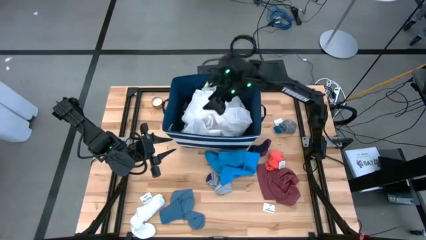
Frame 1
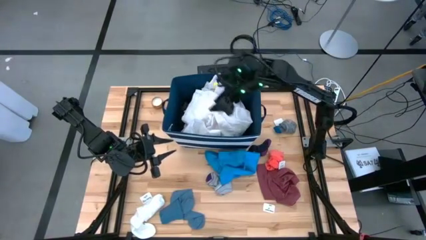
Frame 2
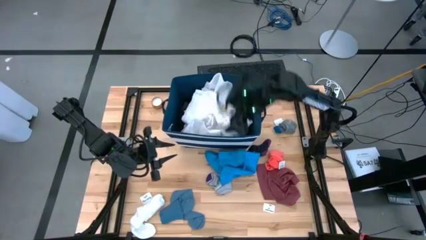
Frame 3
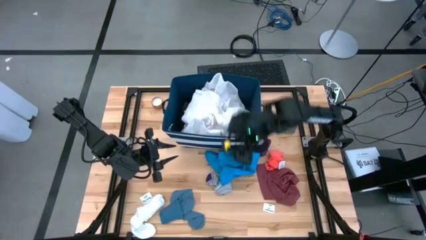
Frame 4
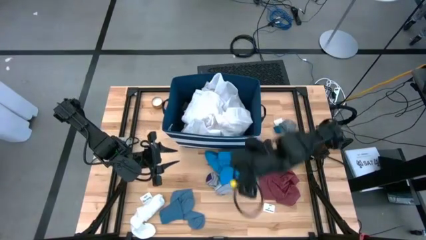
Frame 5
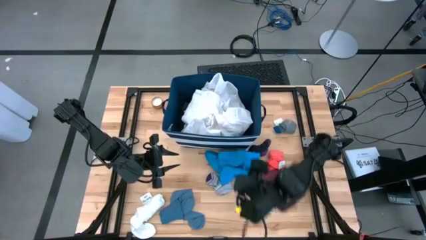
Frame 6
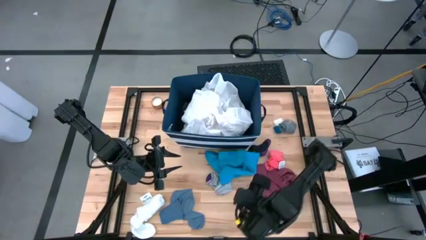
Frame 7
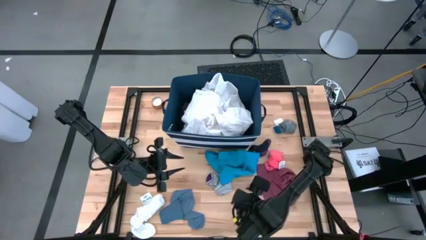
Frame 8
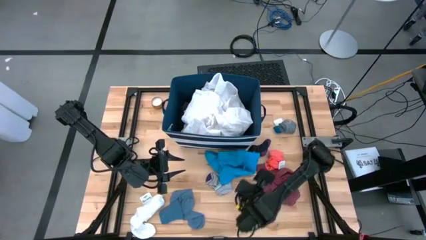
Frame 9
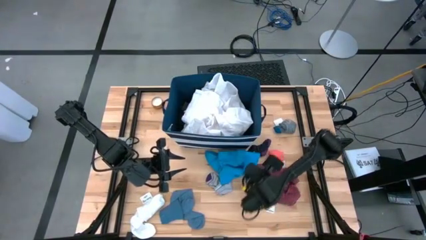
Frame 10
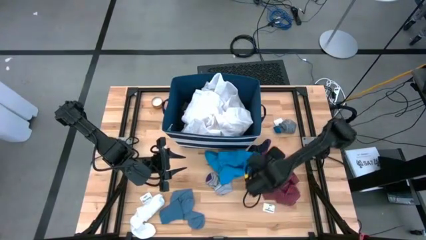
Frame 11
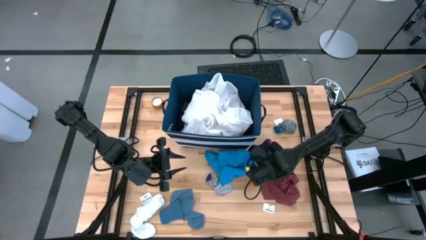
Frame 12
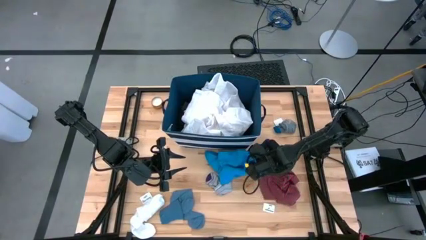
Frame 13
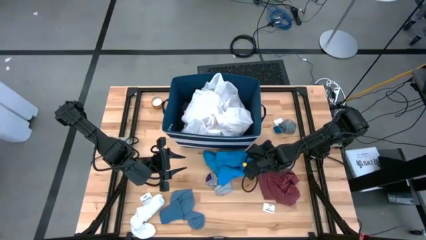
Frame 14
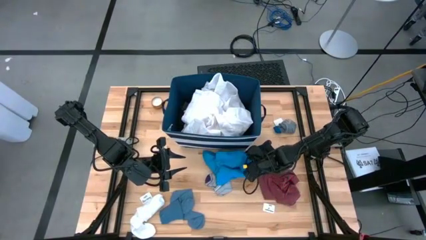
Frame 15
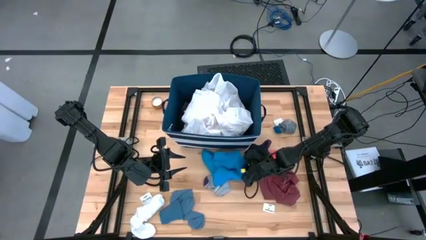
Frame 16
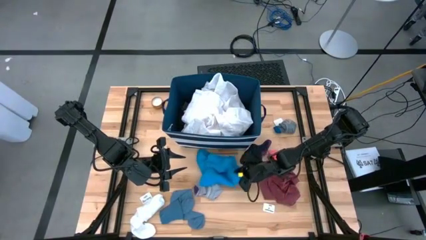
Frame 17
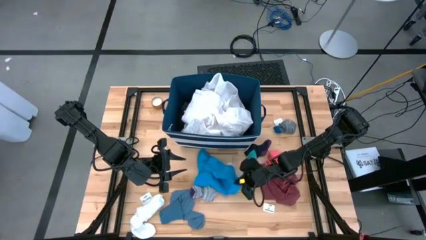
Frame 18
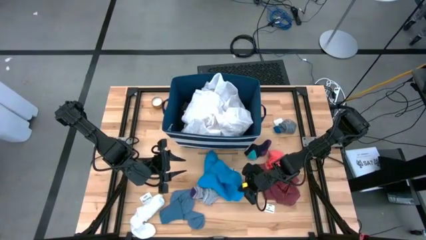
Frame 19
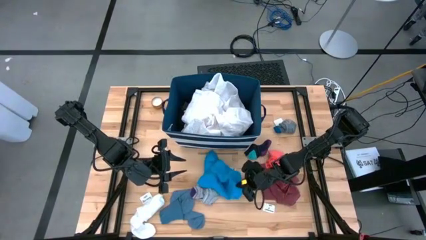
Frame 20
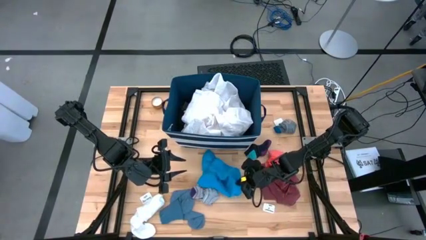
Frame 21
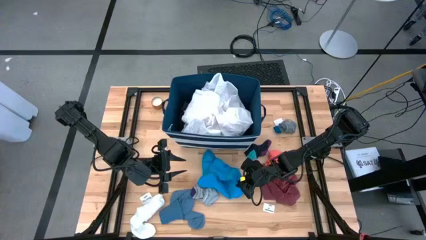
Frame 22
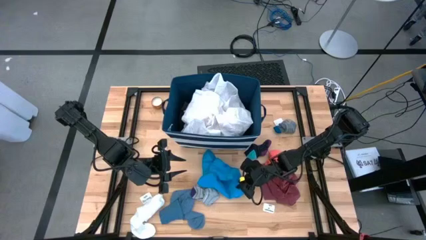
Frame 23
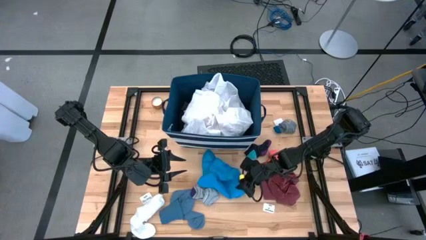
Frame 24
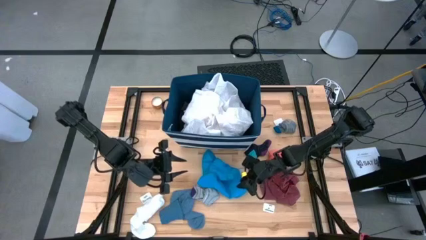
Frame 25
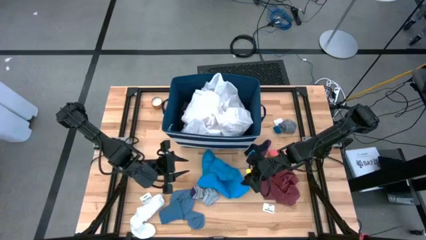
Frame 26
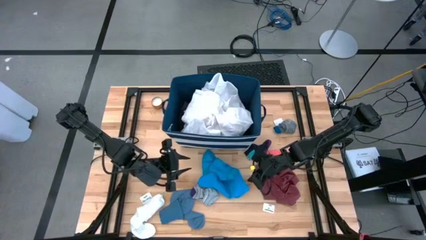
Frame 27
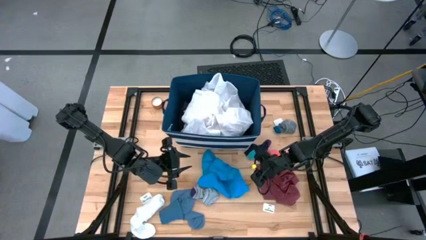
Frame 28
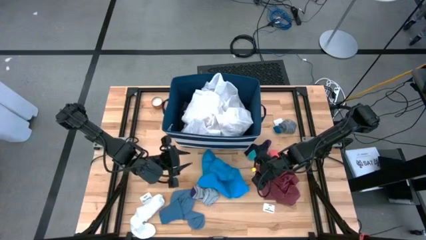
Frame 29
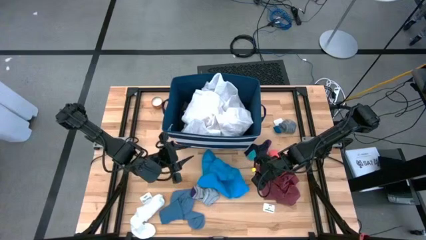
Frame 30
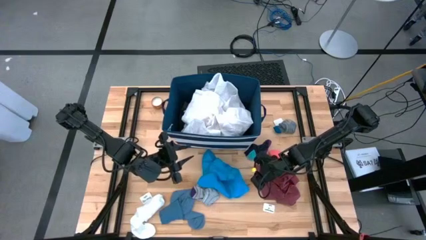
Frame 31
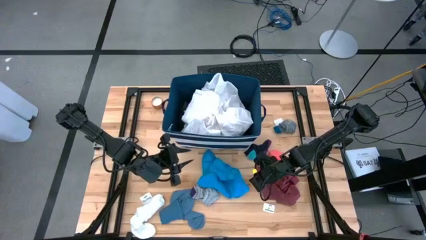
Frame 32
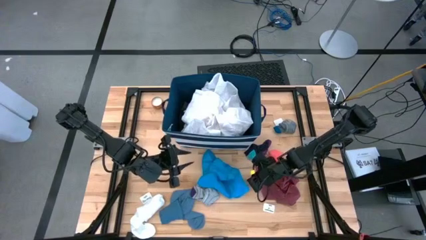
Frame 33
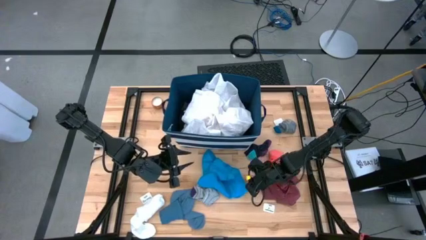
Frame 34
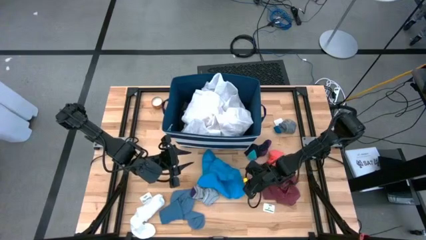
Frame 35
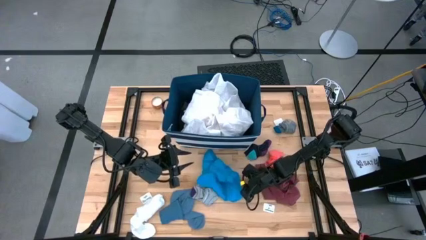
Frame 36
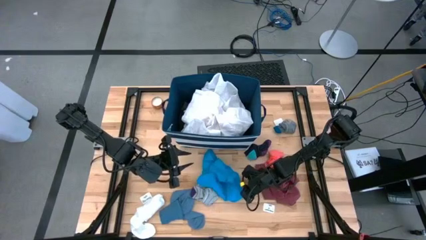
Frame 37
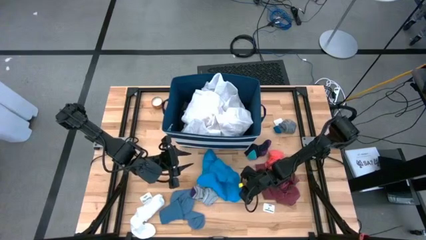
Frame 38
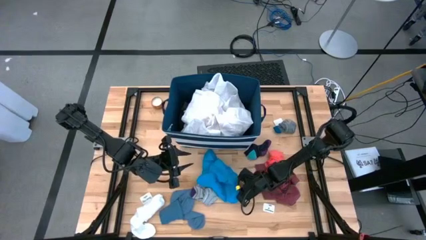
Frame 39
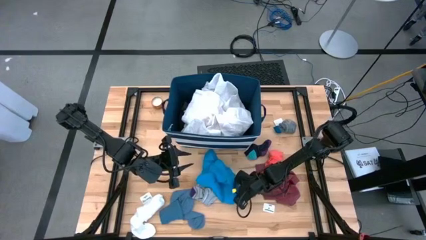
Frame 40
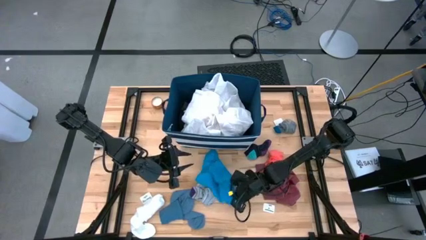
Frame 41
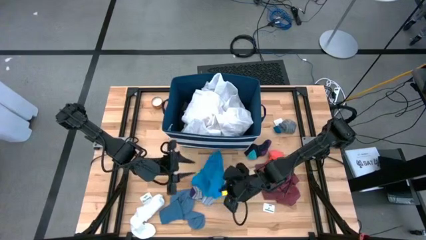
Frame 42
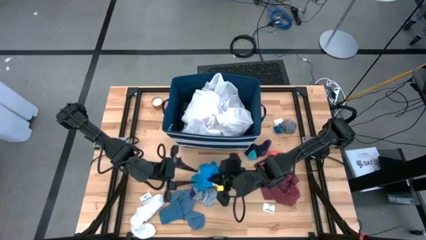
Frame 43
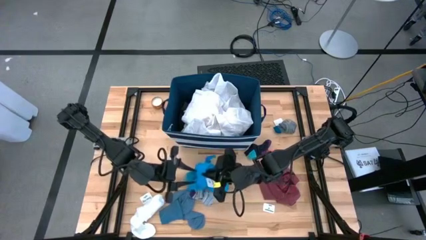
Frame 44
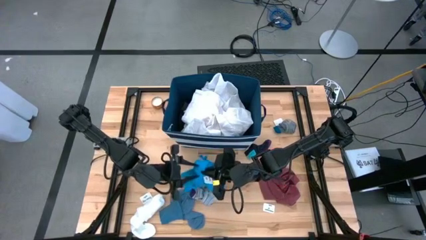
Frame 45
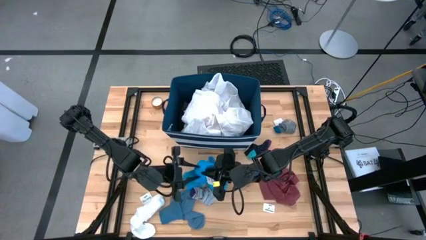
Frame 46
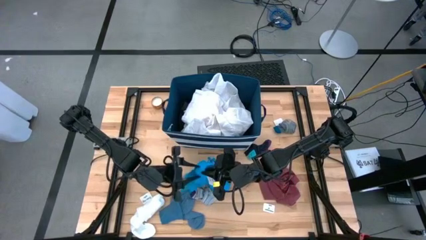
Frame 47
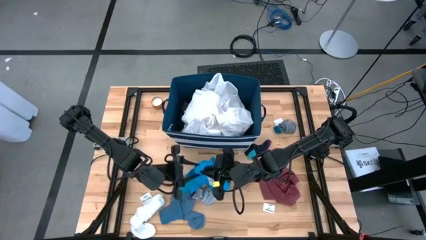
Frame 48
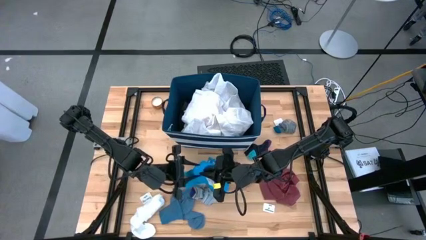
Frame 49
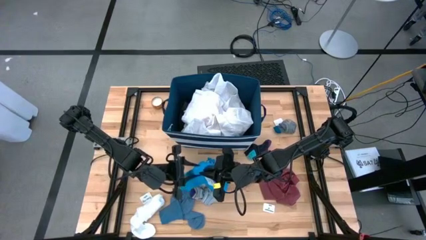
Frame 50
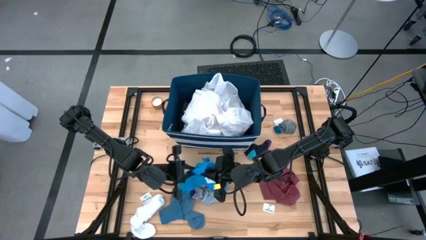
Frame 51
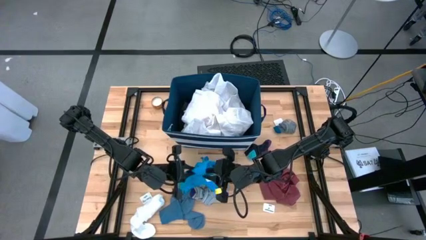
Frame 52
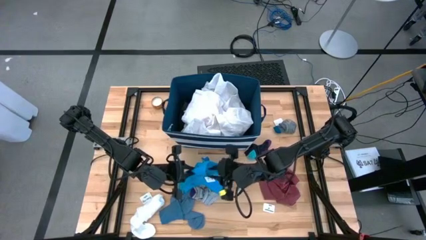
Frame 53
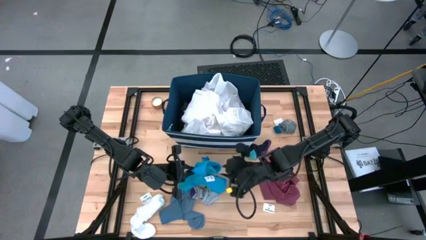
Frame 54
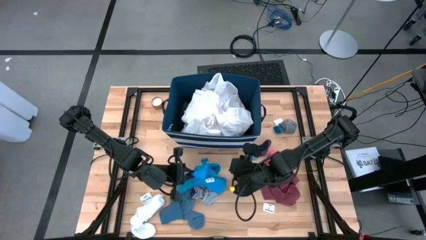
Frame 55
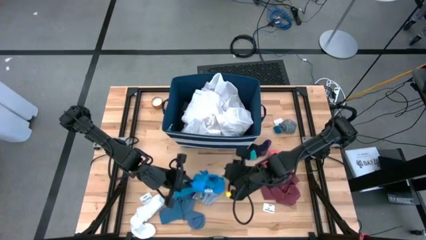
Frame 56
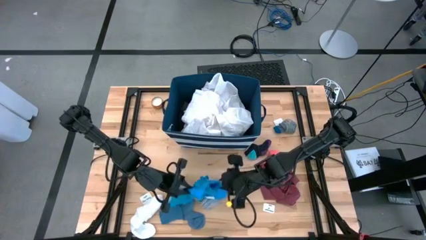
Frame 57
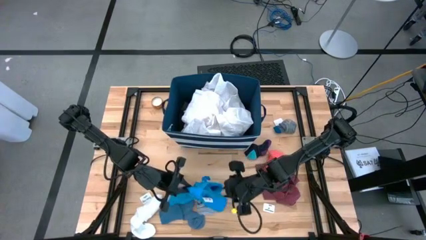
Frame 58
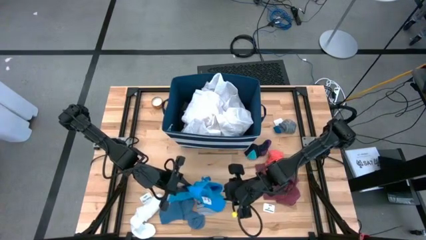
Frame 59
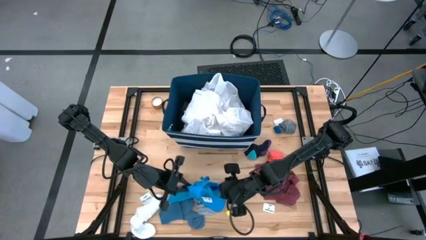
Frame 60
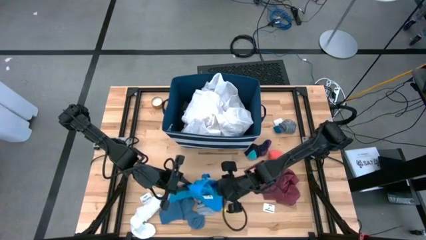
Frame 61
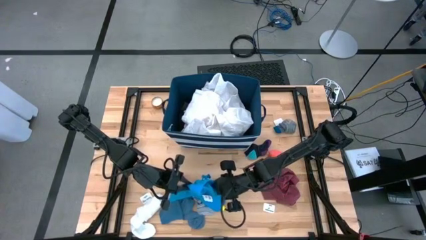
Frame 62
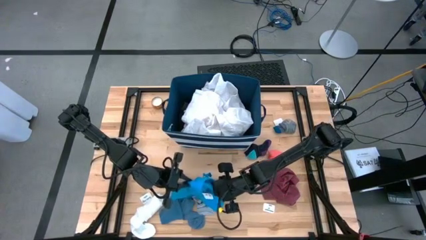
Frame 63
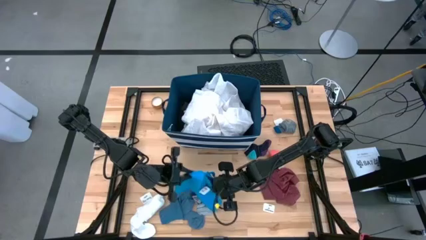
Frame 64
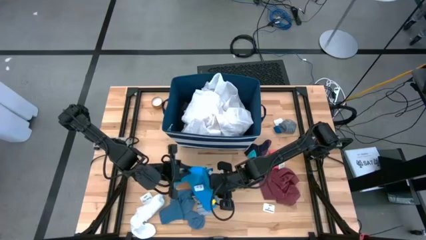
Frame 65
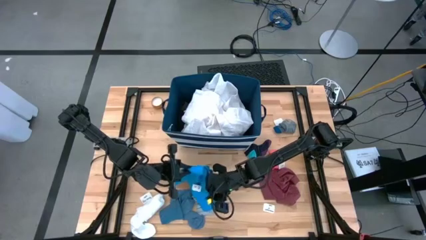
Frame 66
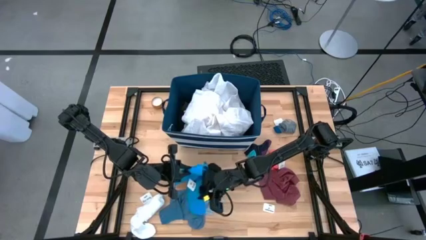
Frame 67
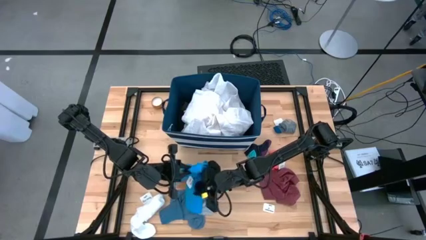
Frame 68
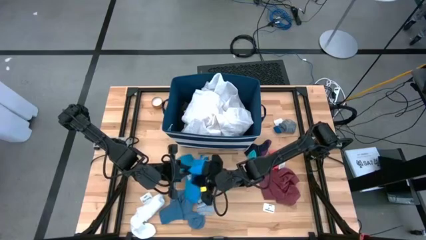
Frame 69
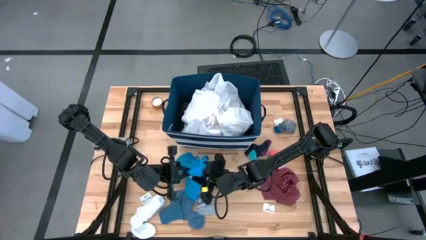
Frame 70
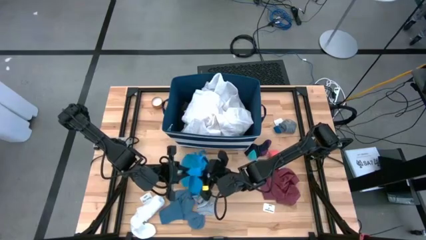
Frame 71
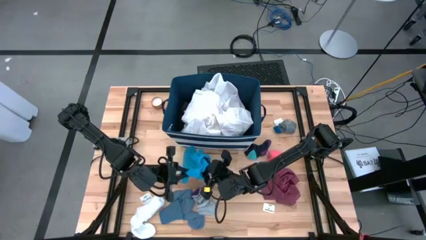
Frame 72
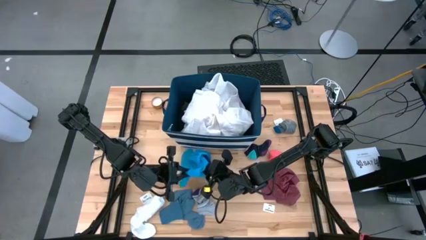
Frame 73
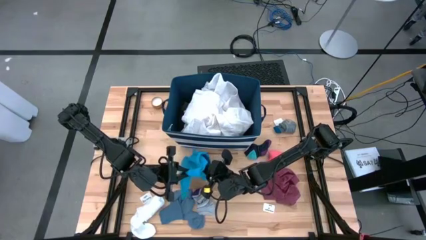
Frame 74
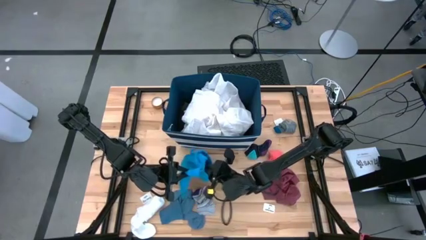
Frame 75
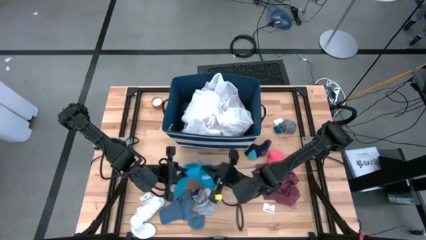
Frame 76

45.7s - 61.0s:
Task: Sort clothes
Put the blue short into the white and blue laundry organizer

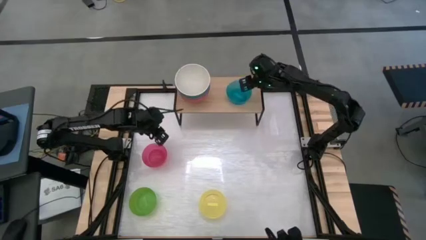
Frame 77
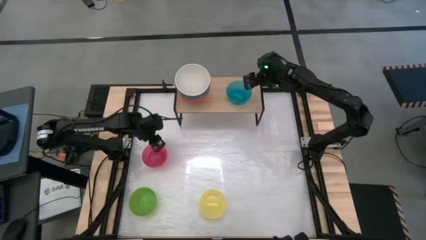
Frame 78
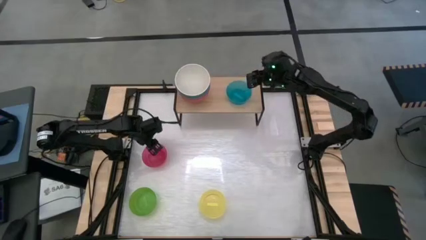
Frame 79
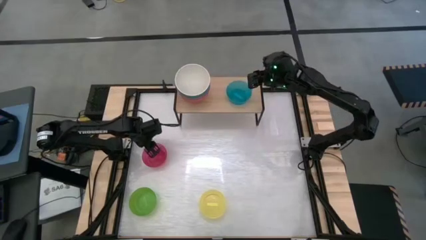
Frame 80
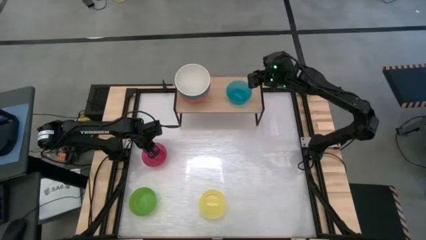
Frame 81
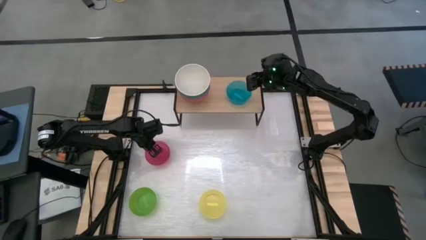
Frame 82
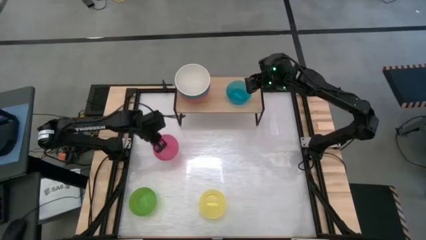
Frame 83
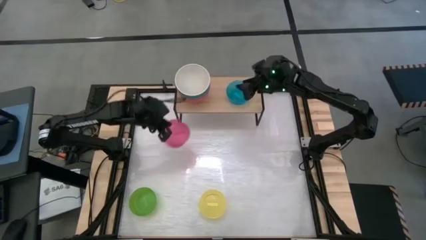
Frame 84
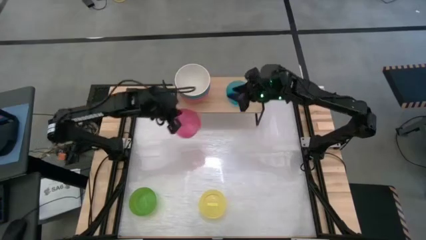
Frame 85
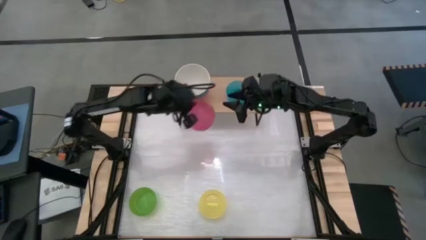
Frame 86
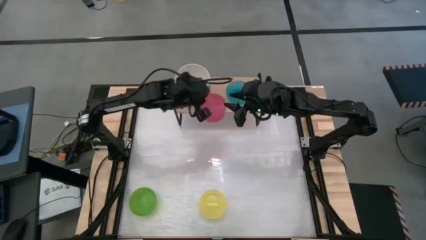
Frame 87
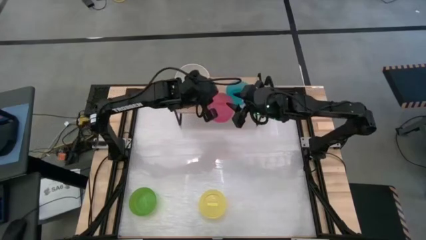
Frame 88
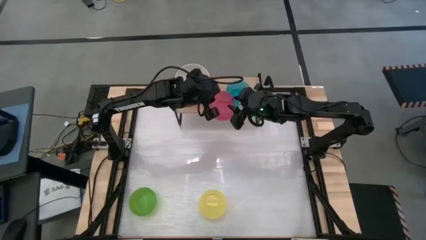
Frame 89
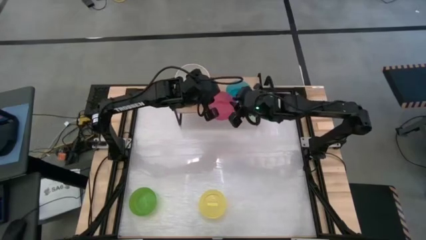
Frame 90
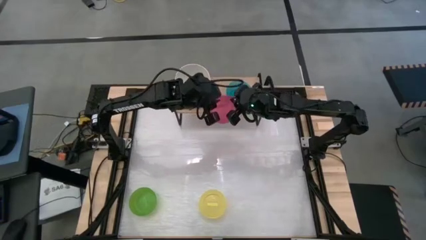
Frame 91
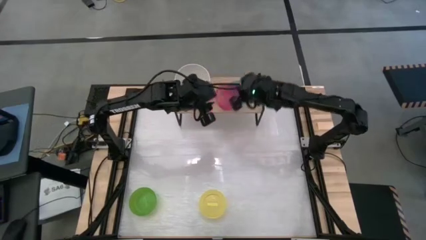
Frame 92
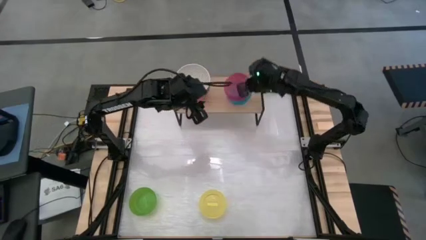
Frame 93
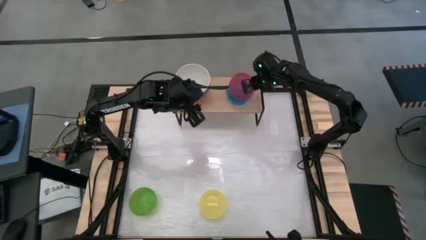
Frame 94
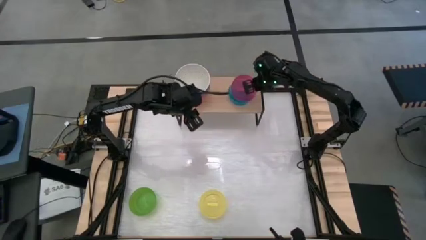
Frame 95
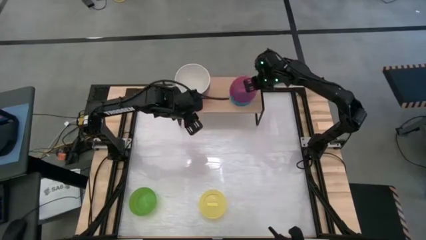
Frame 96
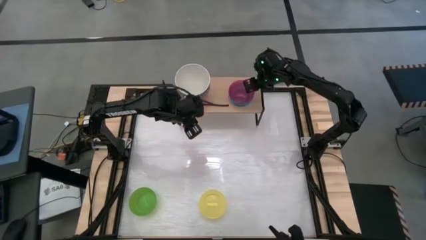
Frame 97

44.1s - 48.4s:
Task: Place and stack bowls onto a shelf
Stack the light pink bowl on top of the light blue bowl on the shelf
